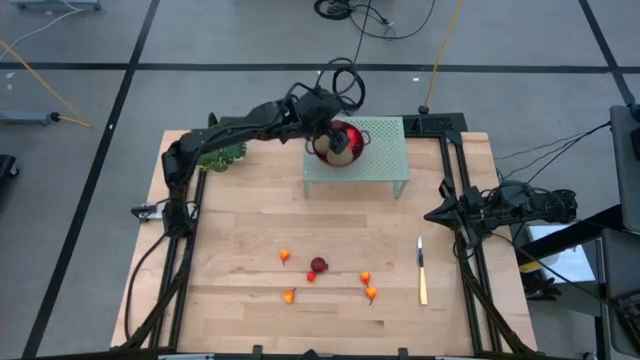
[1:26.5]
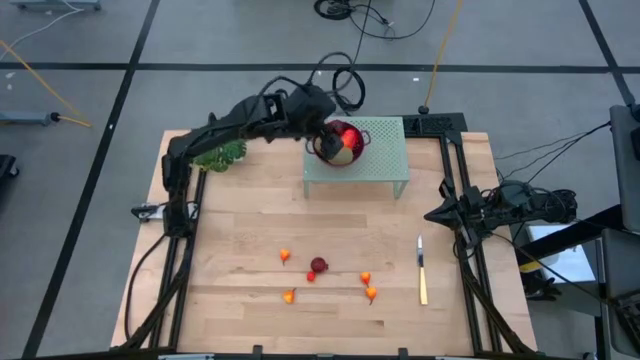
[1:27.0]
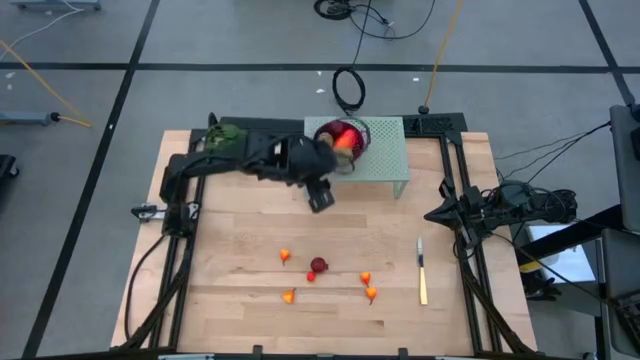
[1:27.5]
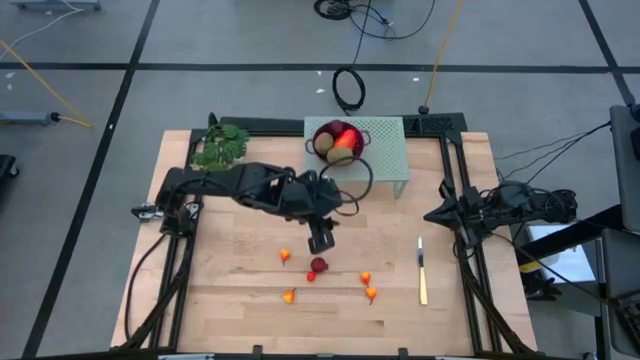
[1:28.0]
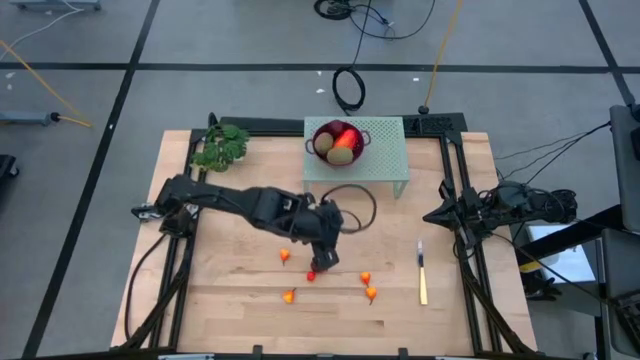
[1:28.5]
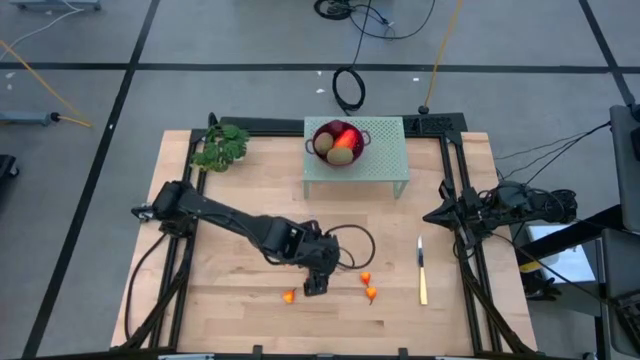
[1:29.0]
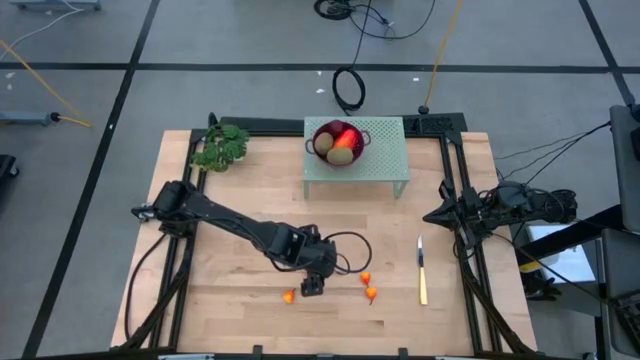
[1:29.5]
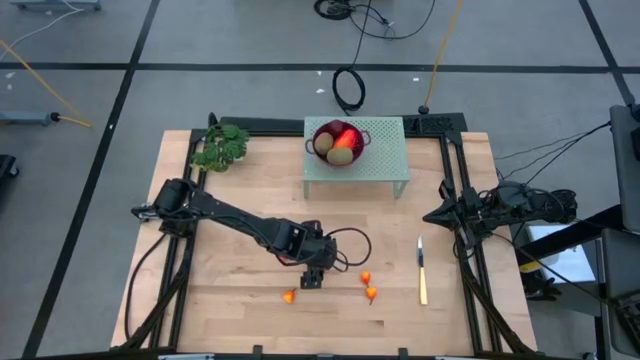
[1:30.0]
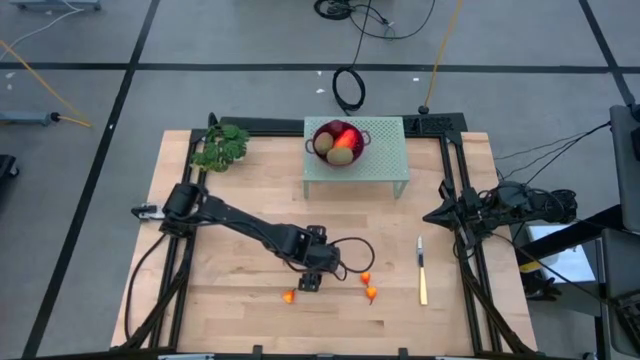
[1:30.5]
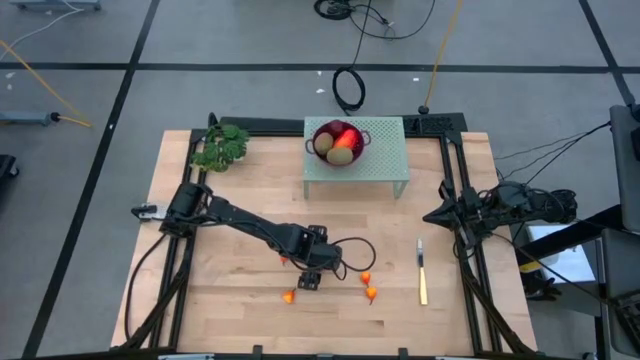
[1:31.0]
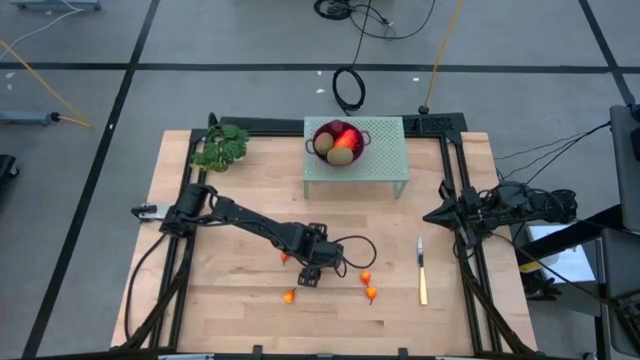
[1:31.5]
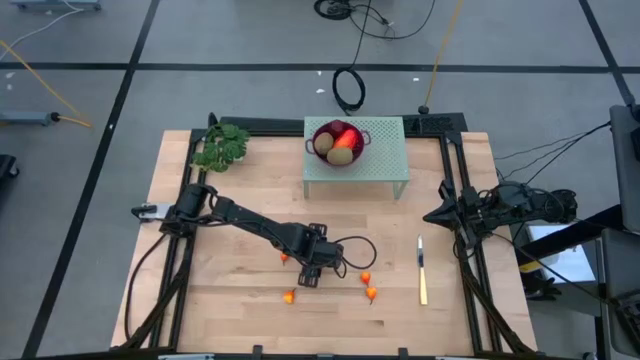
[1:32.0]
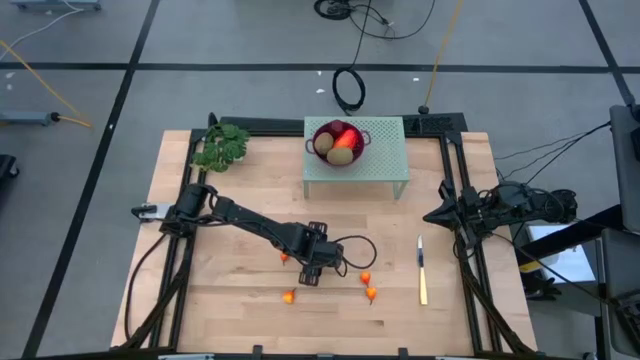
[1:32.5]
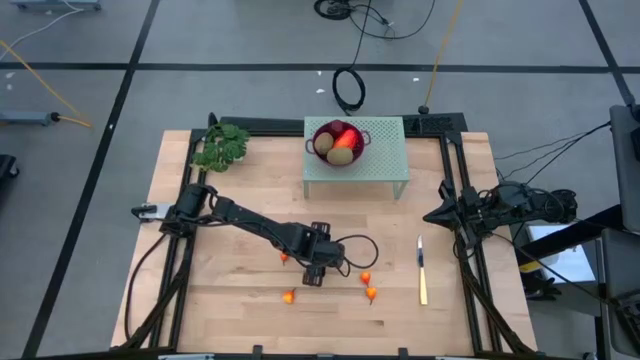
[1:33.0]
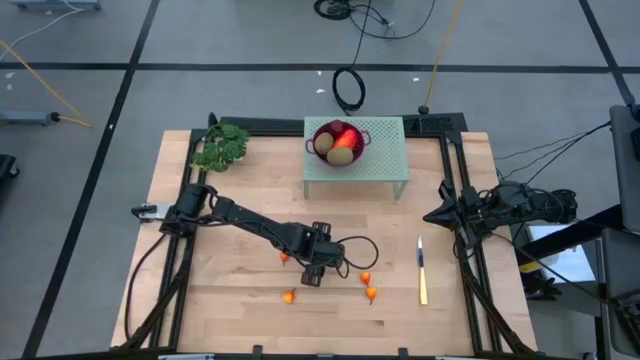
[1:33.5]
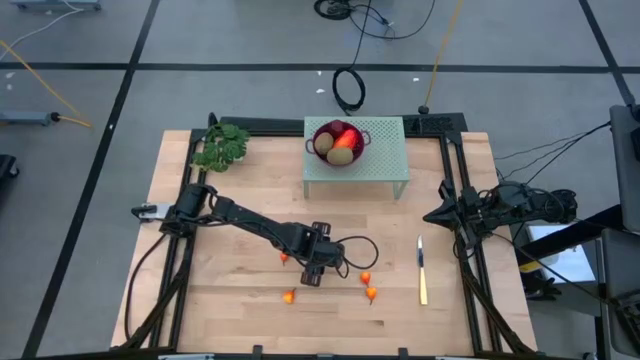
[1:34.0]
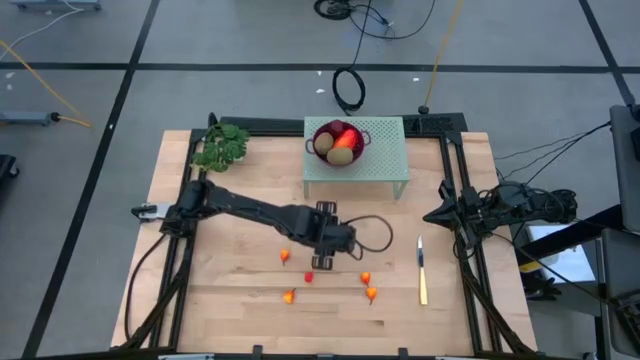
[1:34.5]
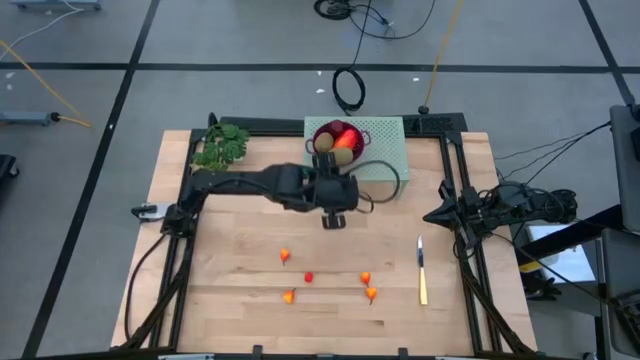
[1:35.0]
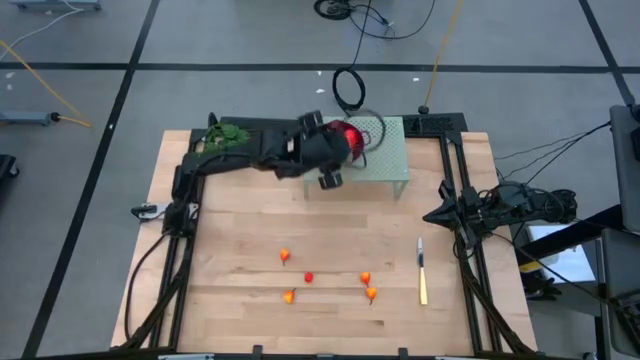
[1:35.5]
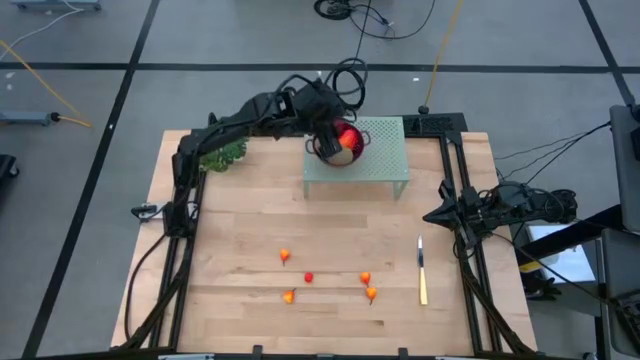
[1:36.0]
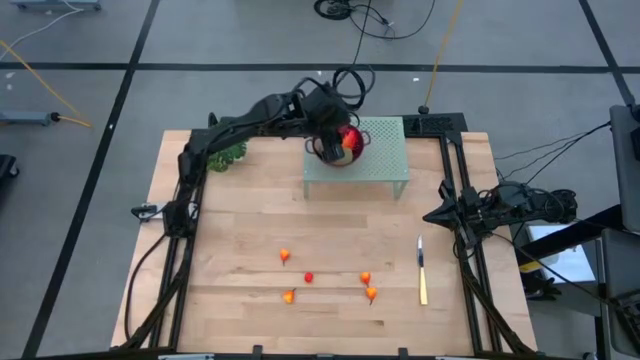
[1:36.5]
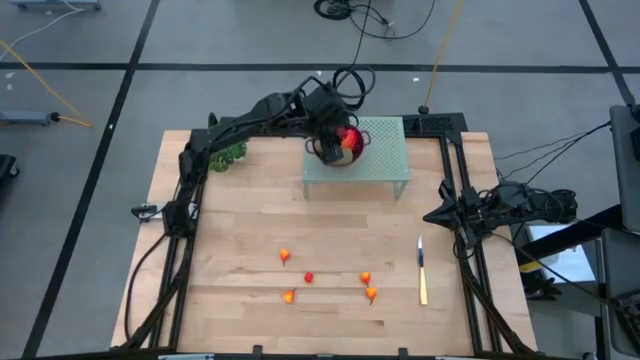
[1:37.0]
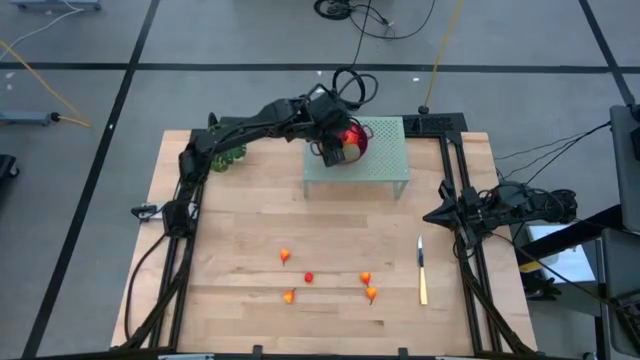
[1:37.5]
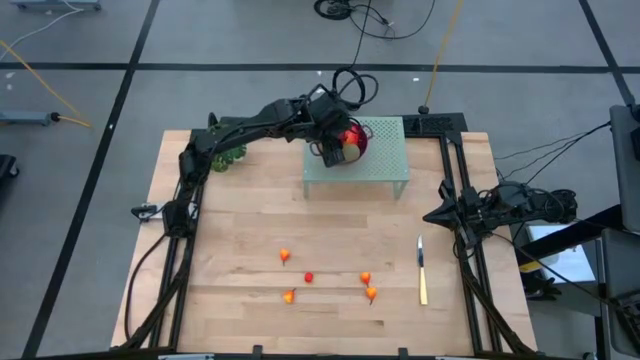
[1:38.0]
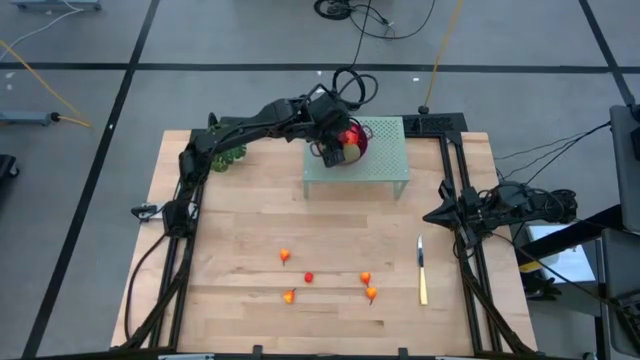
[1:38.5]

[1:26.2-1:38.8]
Task: Pick & Place Fruit
Put the pomegranate into the strainer bowl

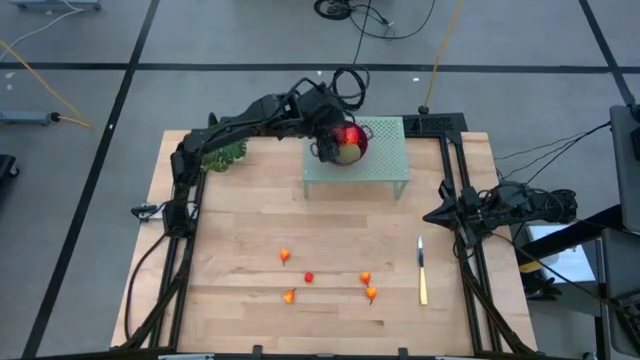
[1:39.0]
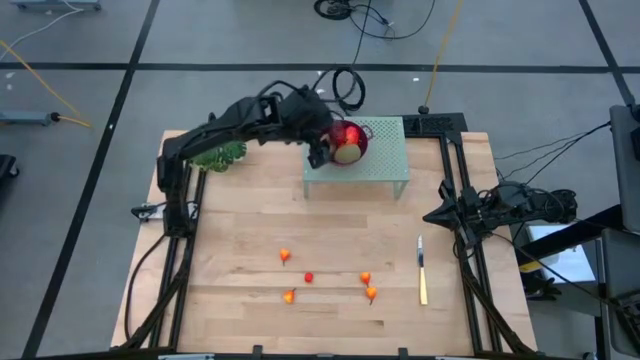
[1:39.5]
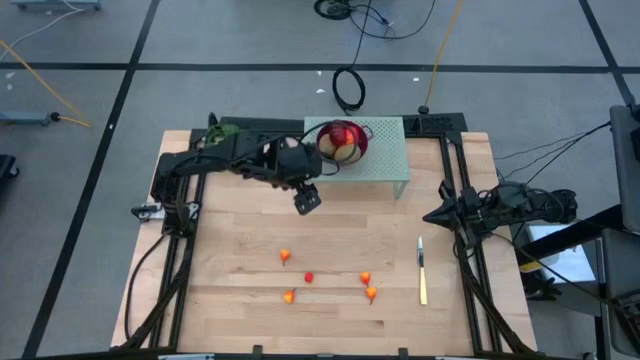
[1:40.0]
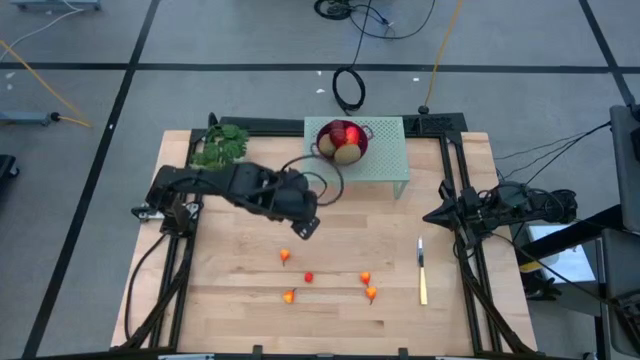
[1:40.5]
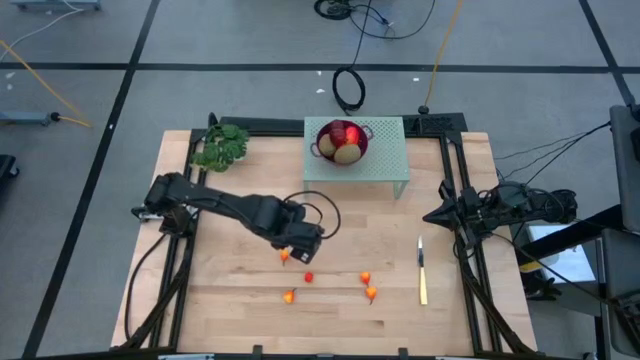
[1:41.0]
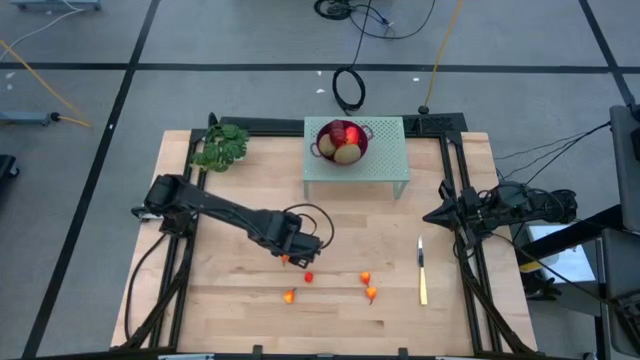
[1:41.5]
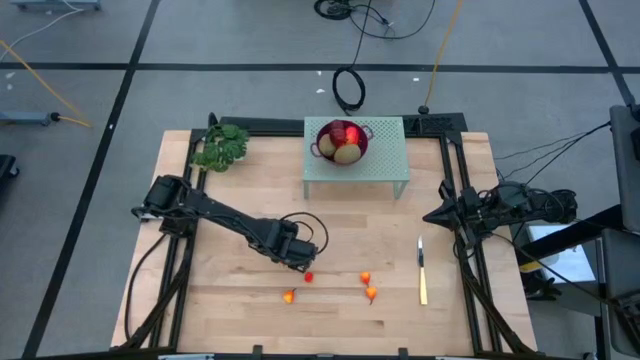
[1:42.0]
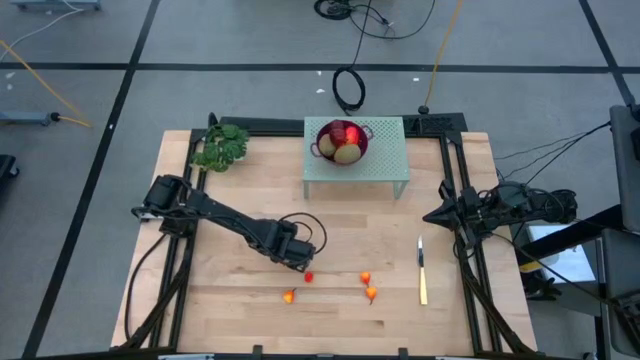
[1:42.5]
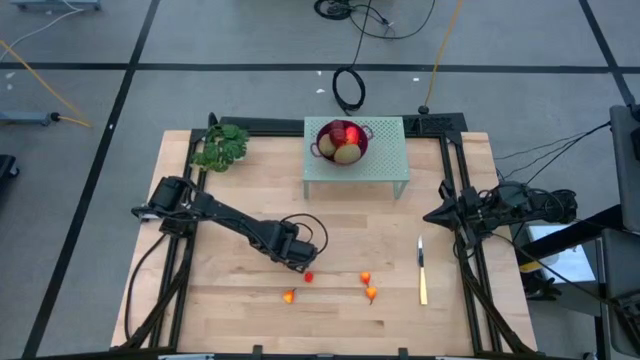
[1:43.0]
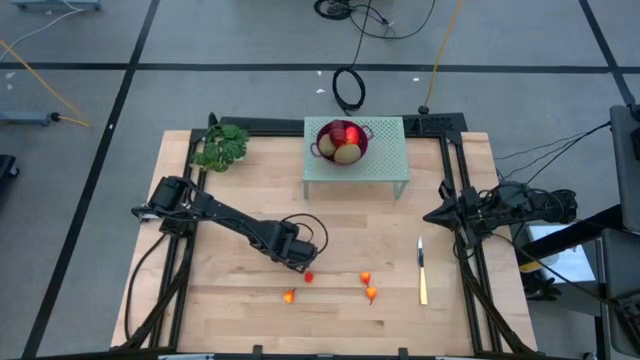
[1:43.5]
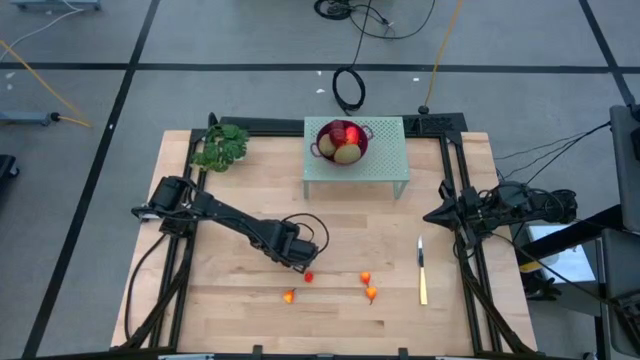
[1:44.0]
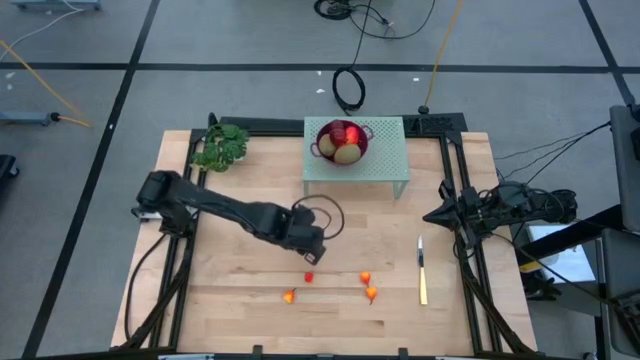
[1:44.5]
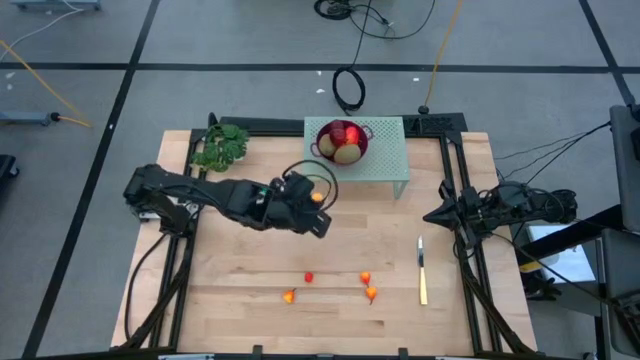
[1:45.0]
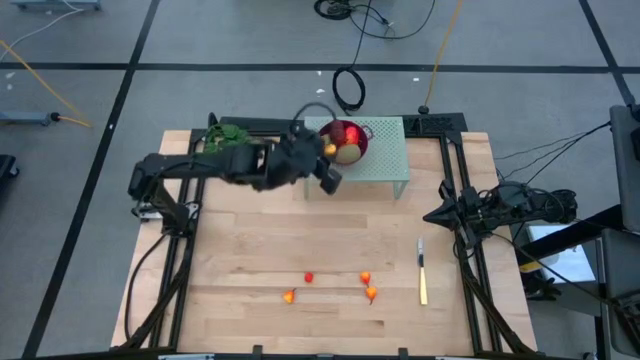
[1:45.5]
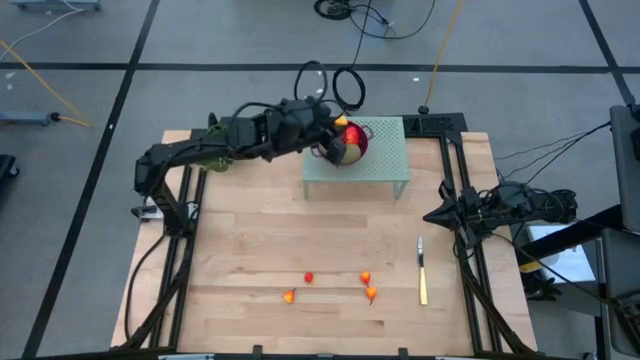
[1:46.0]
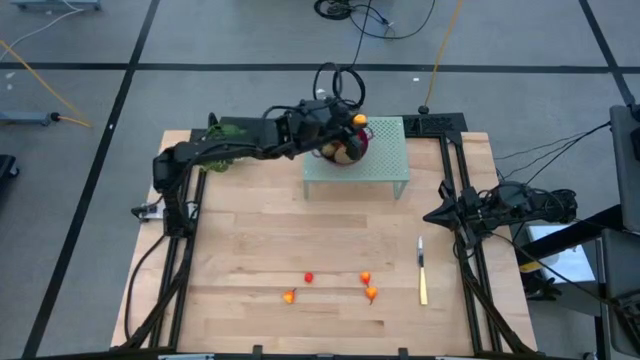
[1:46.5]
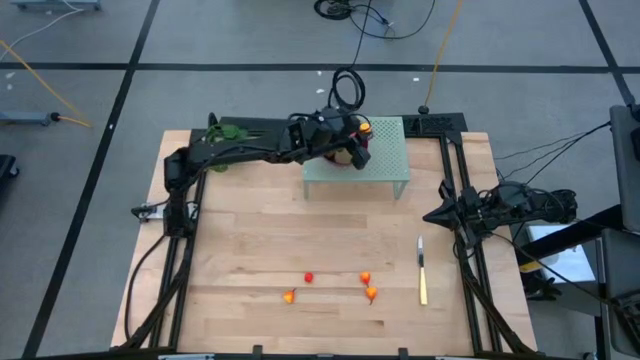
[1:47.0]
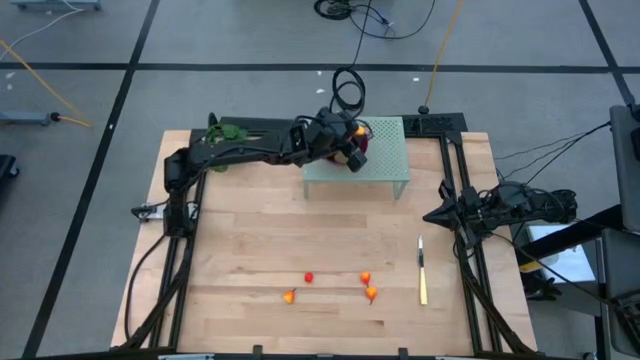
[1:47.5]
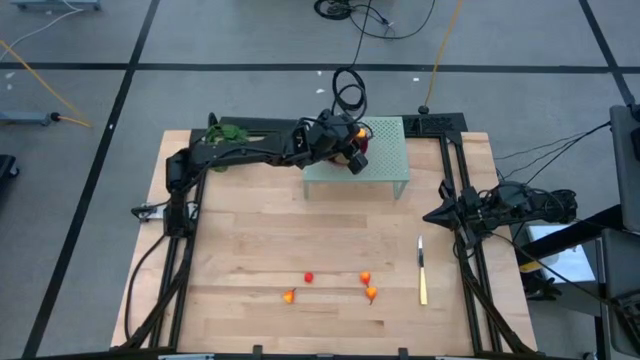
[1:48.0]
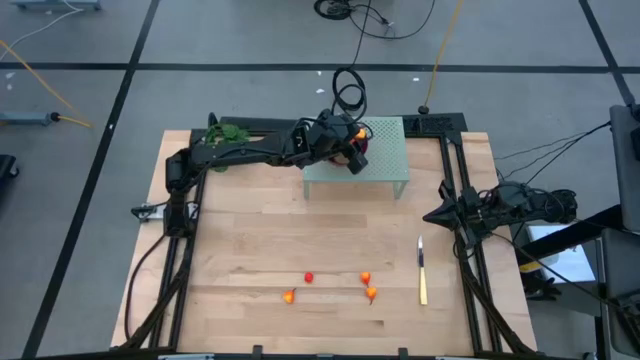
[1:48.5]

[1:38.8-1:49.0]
Put the pear into the strainer bowl
